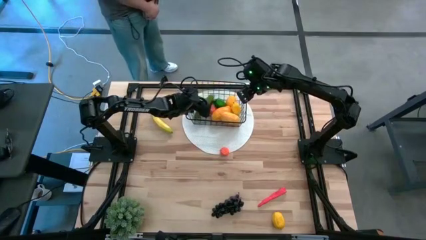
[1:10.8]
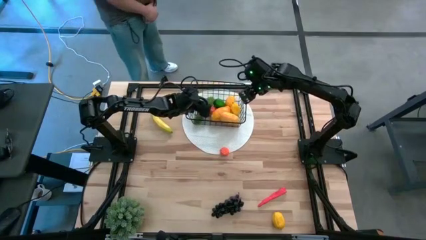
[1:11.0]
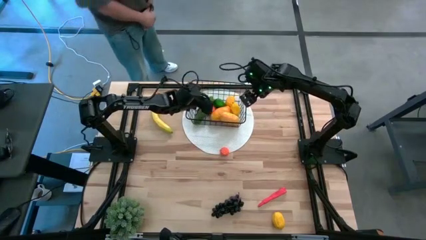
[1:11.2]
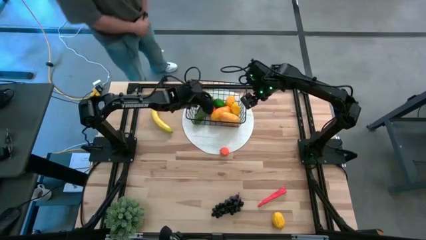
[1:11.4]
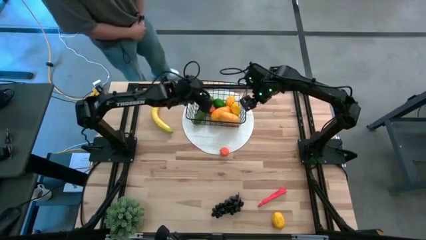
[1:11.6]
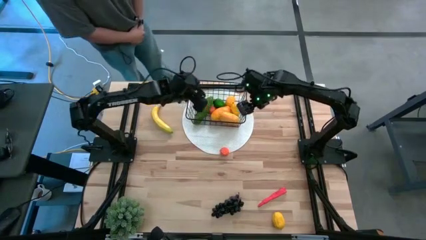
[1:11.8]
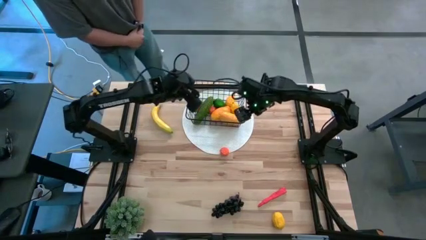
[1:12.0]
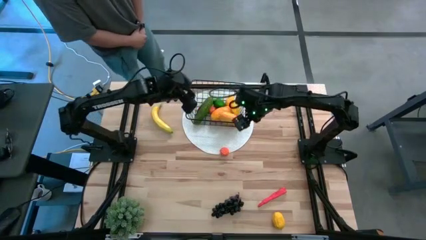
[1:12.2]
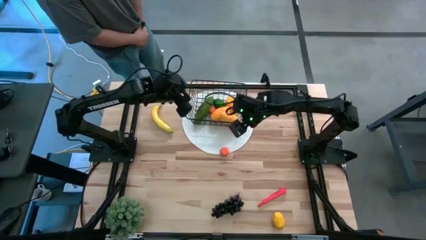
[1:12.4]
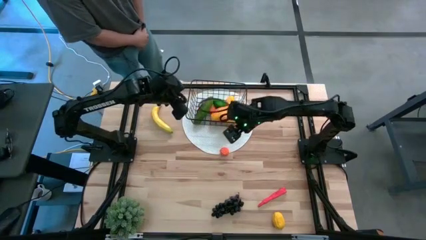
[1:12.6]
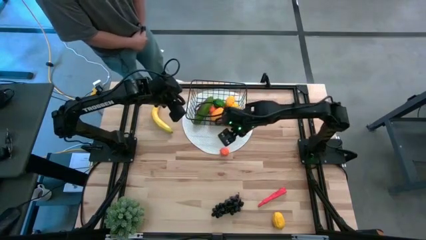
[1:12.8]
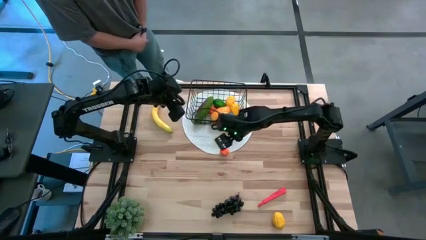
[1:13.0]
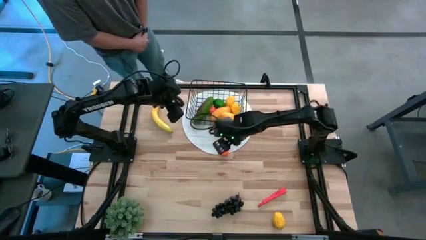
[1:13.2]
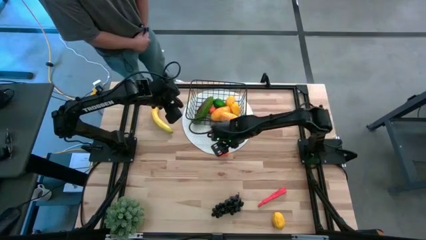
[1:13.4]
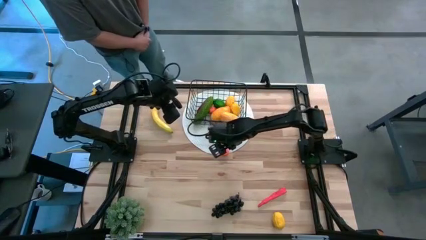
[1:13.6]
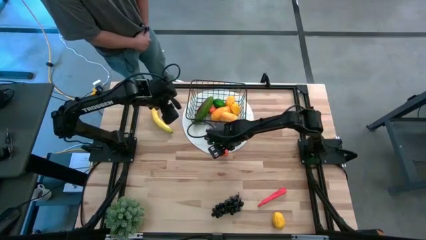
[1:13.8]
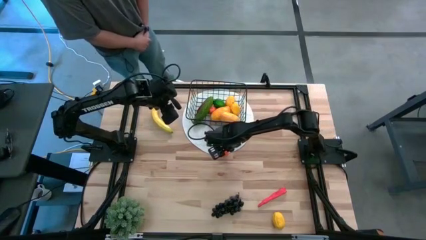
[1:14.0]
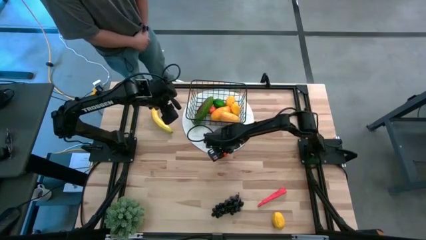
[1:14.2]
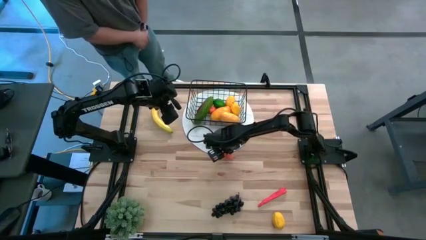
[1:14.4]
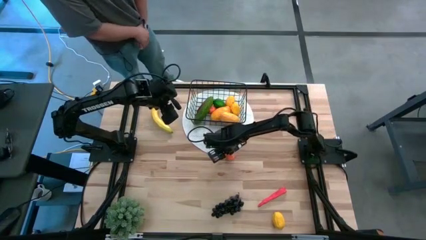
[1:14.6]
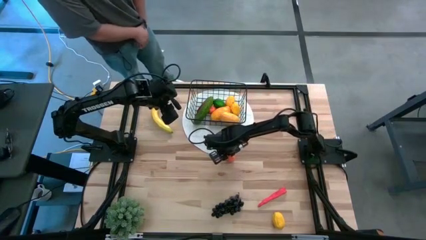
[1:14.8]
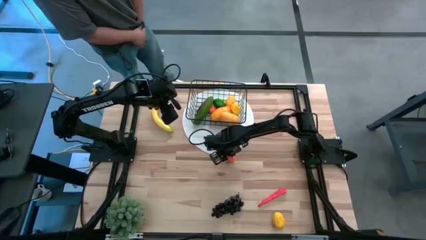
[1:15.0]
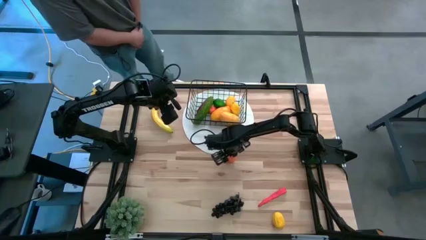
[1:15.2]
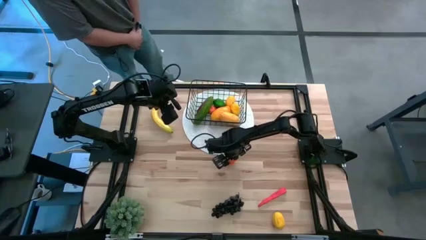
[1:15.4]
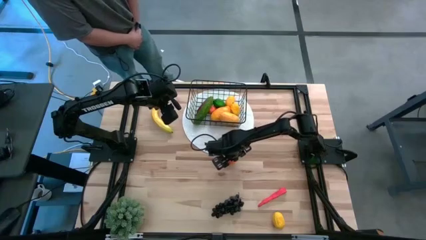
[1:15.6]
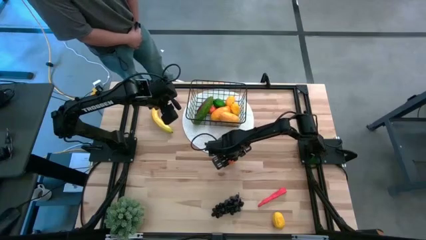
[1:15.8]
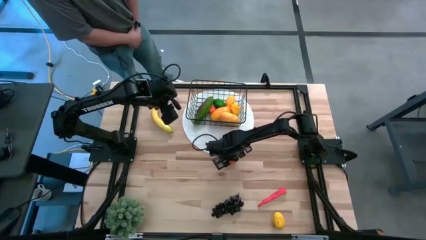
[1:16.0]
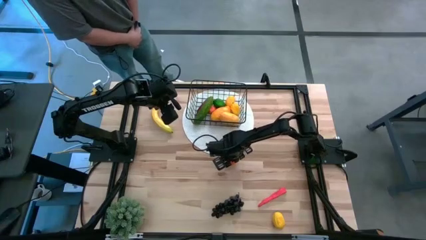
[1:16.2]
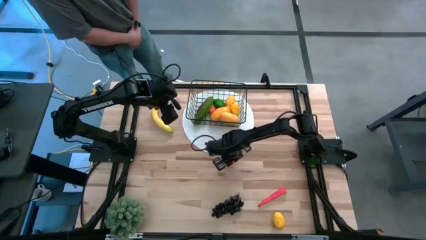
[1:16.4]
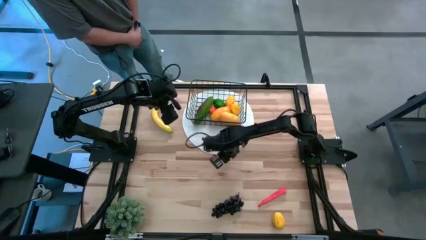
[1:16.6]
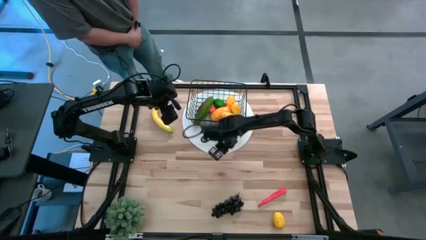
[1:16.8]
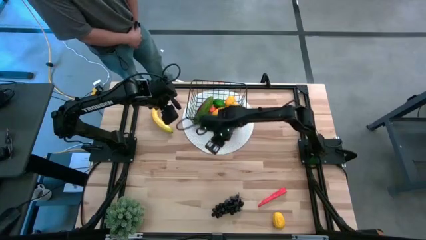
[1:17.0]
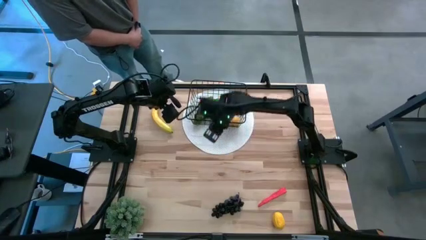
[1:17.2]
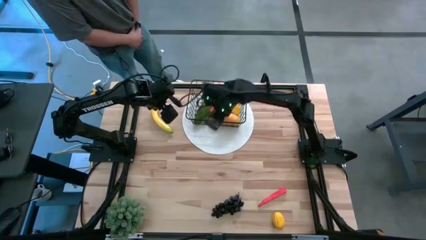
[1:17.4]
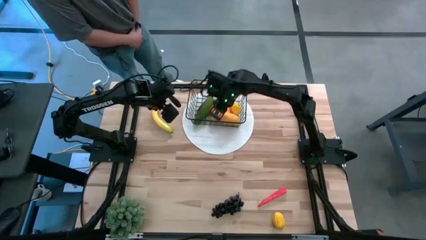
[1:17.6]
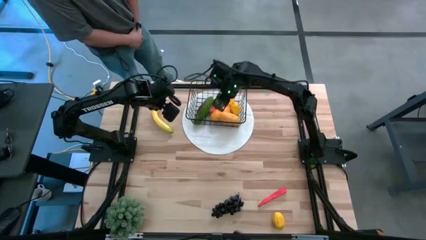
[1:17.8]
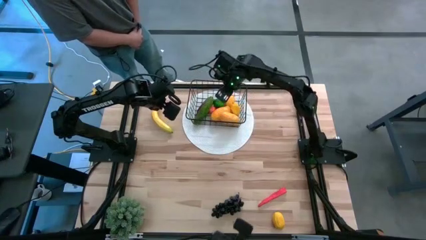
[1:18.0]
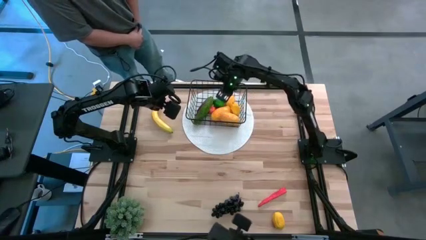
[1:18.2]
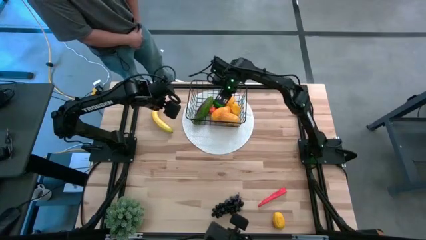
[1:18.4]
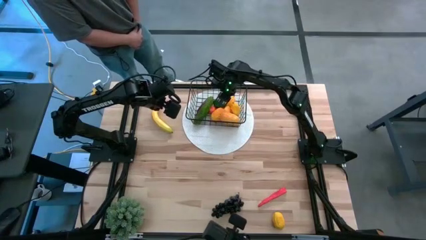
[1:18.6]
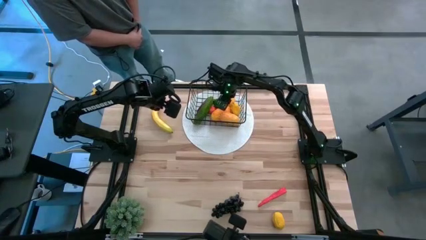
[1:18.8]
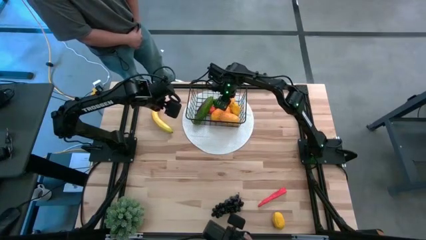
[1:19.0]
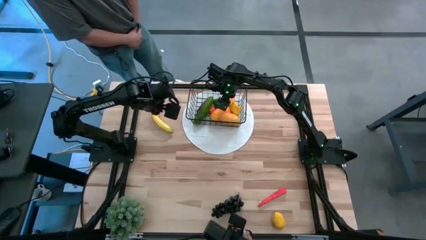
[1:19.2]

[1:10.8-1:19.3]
Task: Build produce basket
Put the orange into the wire basket

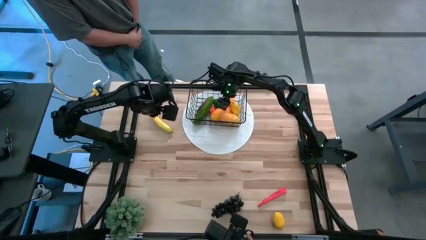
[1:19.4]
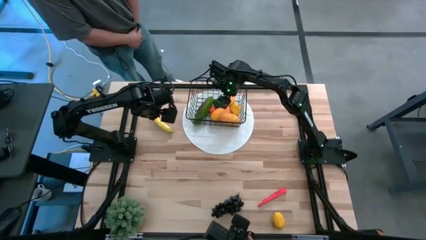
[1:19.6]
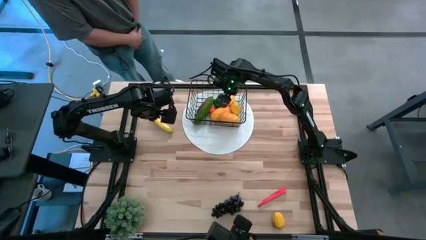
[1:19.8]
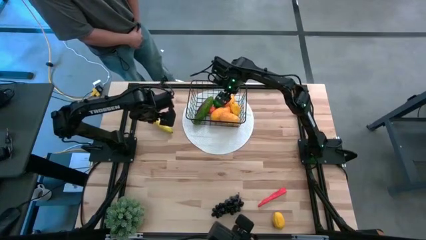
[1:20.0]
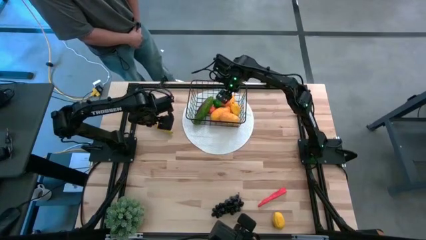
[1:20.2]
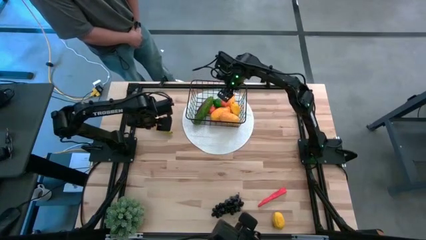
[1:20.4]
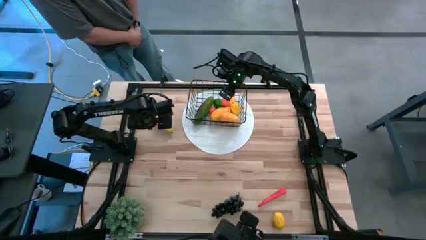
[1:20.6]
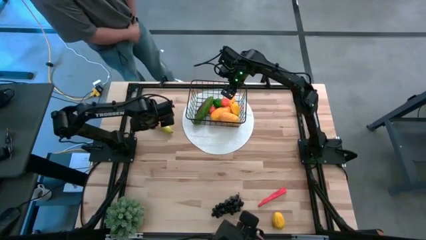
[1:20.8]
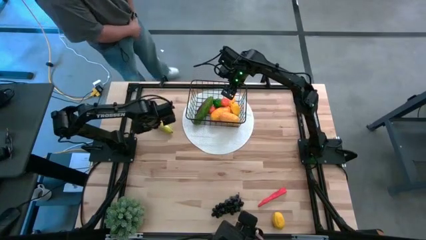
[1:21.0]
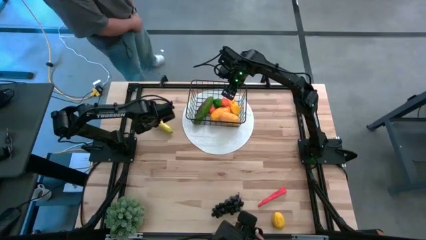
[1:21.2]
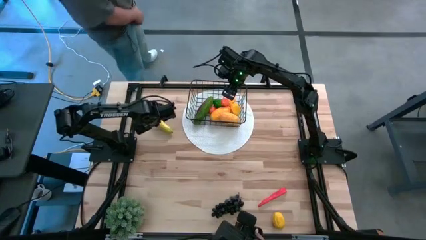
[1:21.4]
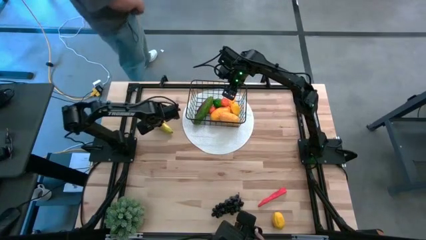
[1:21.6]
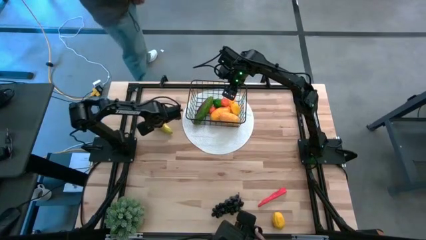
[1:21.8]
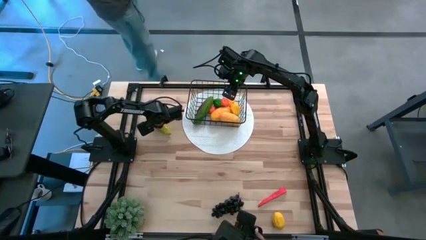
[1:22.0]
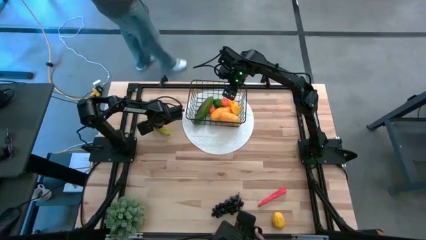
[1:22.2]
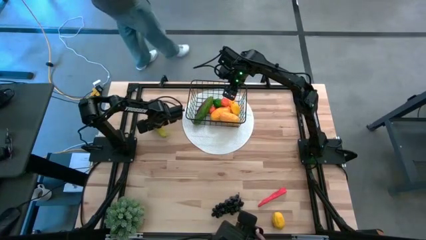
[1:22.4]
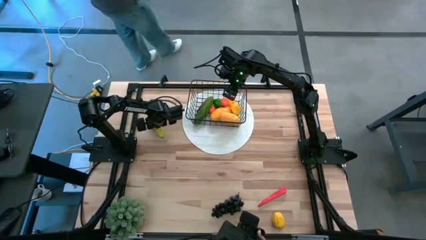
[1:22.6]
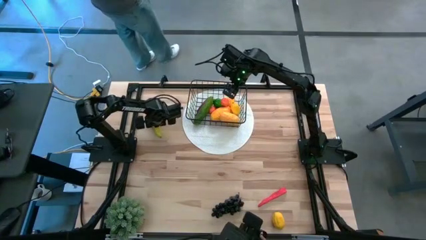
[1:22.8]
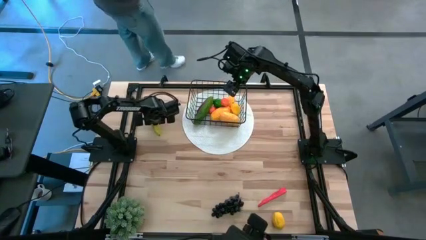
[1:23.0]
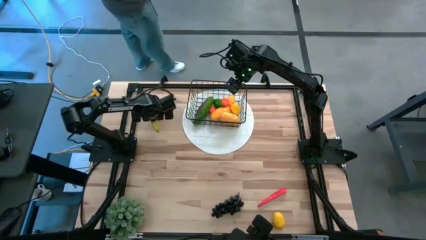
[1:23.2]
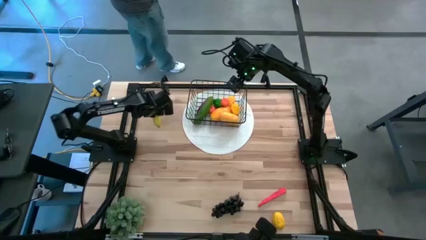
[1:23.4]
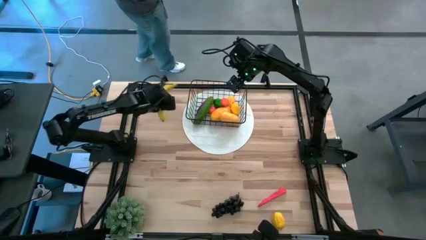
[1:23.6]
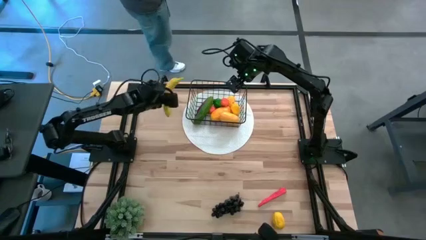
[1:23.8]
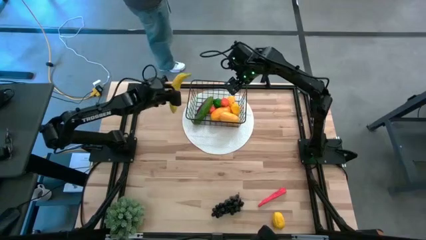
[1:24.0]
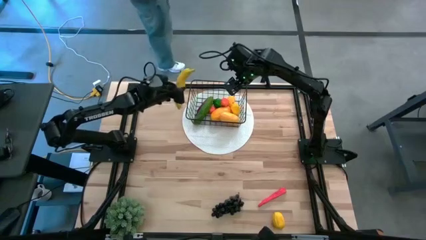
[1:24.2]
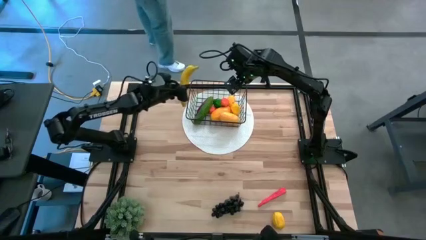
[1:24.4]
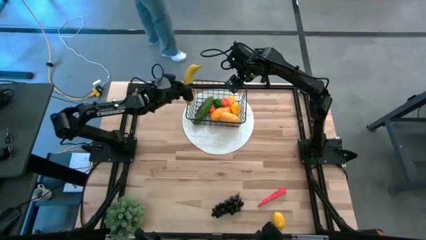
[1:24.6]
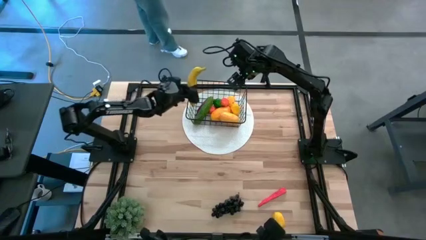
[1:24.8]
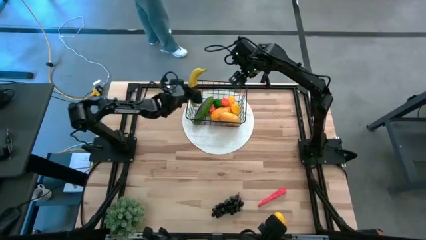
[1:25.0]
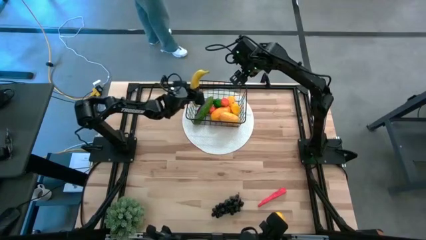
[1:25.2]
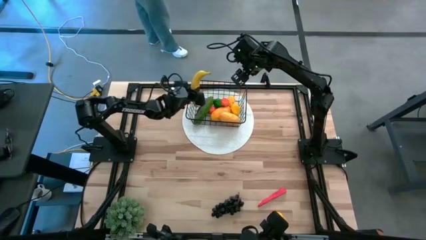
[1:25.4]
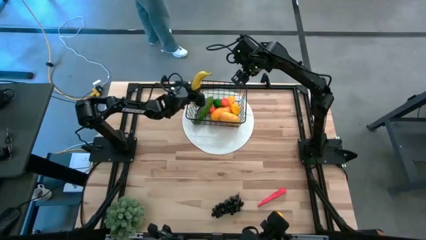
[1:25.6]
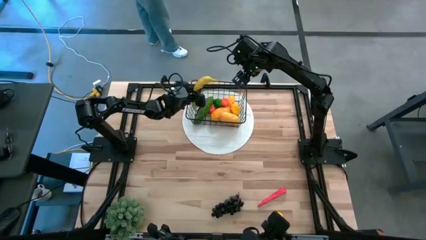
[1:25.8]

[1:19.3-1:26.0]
Put the banana into the wire basket
